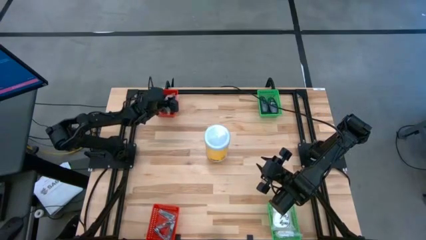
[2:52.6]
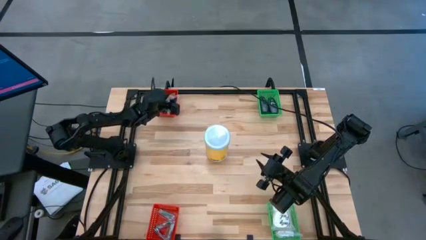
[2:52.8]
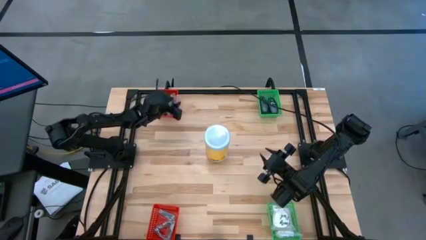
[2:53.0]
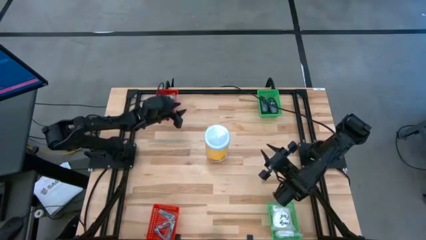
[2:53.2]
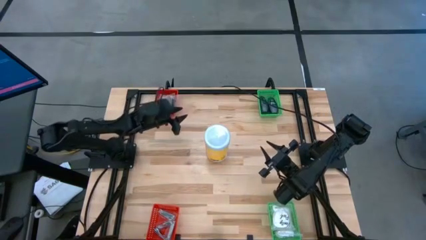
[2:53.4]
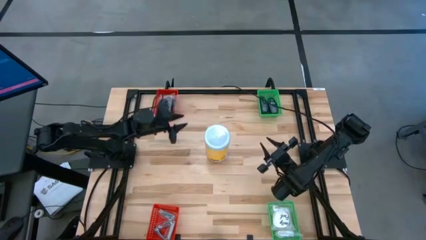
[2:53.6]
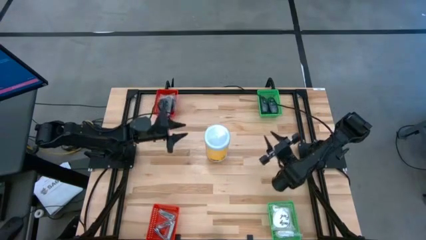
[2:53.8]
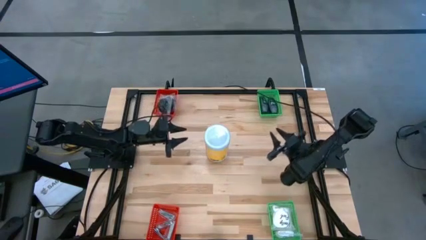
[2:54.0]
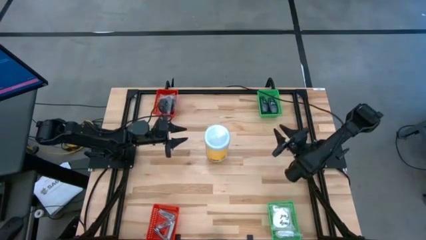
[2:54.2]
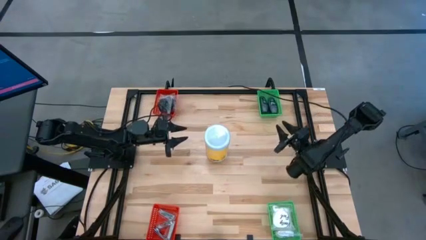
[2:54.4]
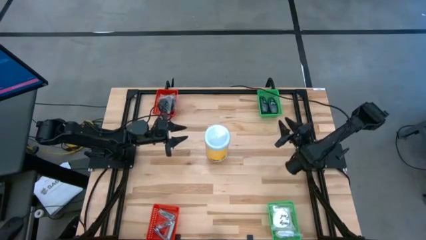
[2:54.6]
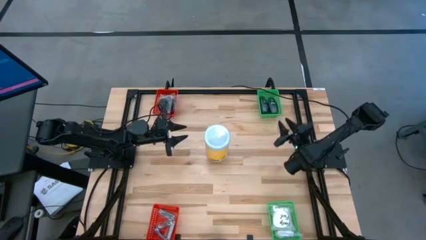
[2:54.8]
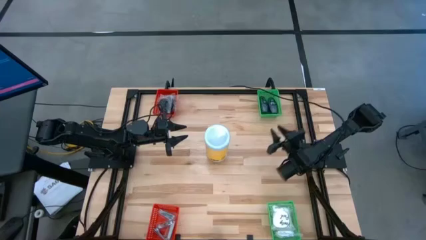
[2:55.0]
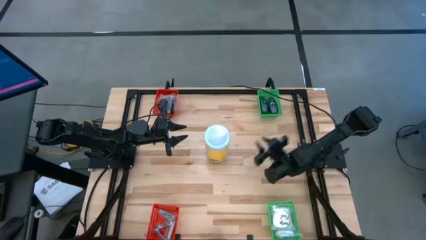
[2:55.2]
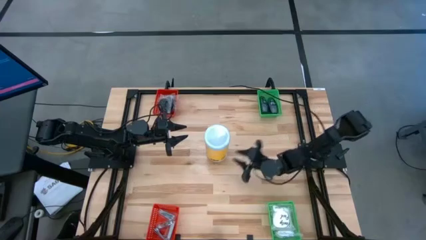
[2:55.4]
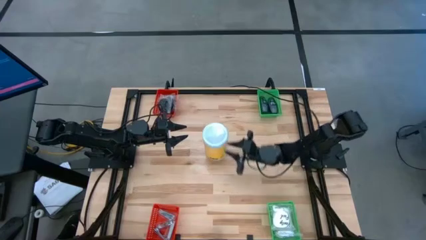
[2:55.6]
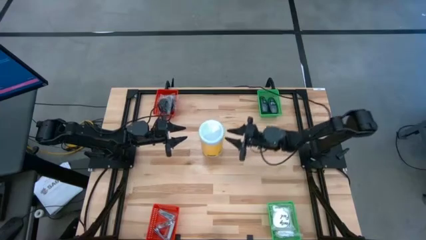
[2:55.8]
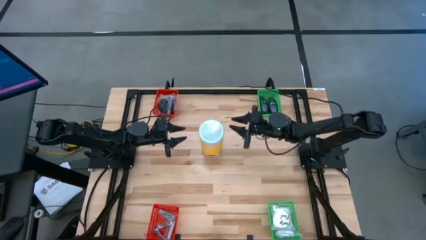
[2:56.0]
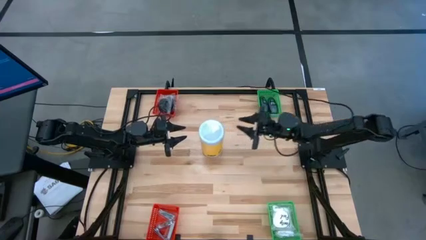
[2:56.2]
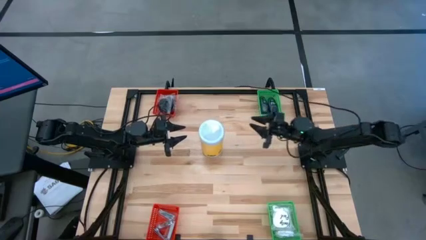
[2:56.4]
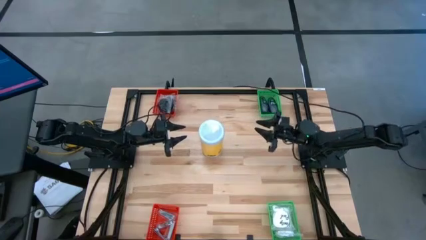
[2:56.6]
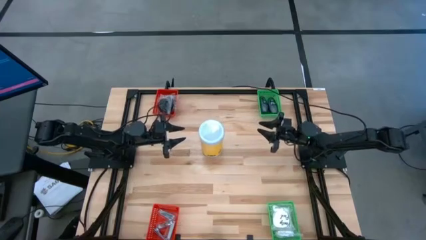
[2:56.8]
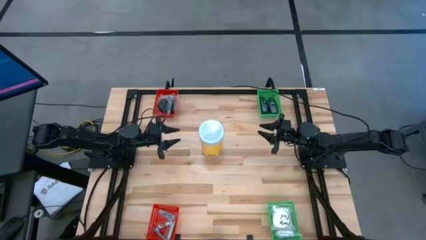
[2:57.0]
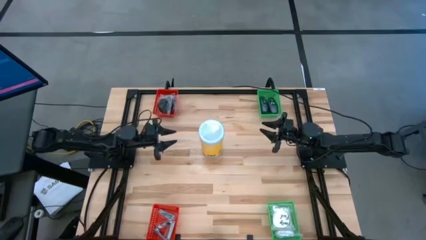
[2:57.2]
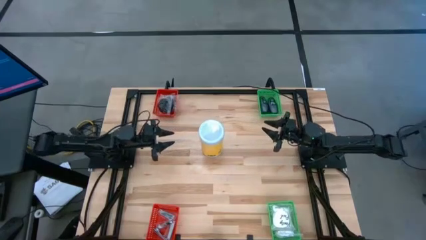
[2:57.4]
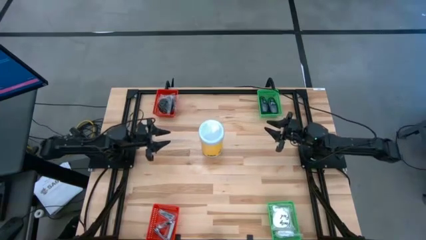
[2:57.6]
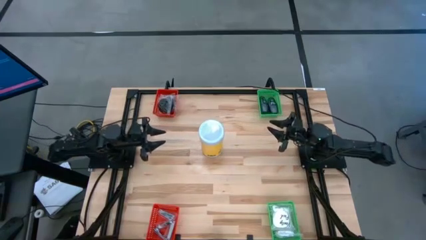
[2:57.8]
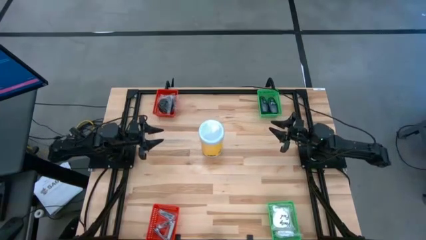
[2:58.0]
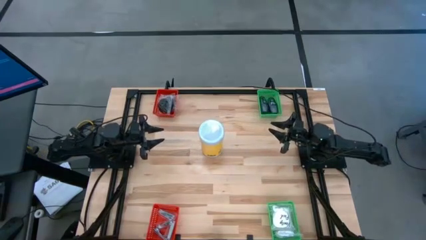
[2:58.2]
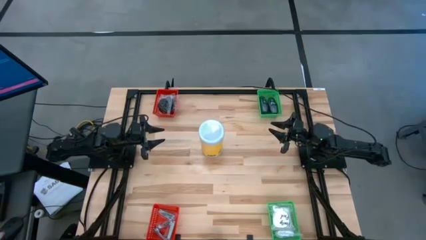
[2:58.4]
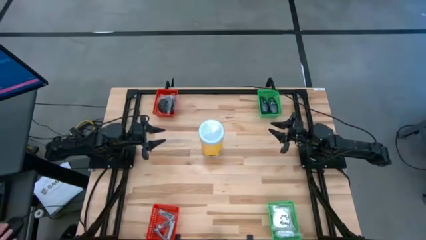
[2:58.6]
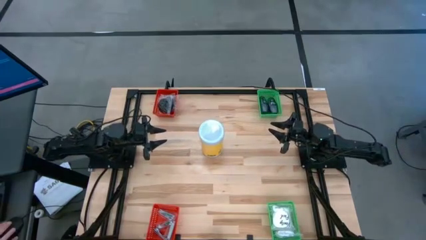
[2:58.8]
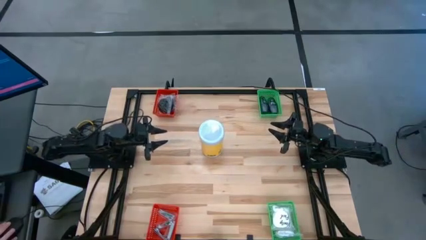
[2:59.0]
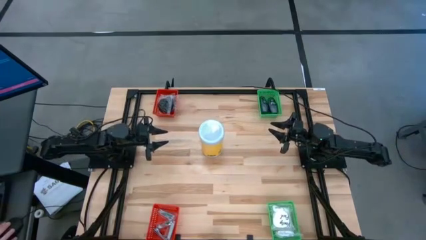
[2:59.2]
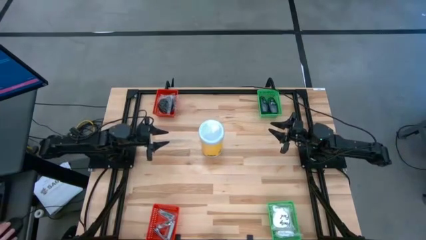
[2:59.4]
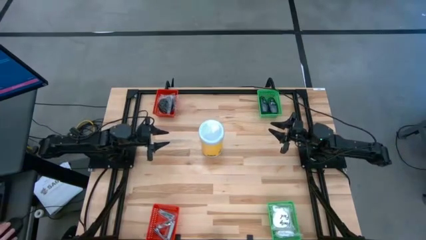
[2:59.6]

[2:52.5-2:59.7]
Task: Pick & Place Travel size toiletries
Return to Home Position

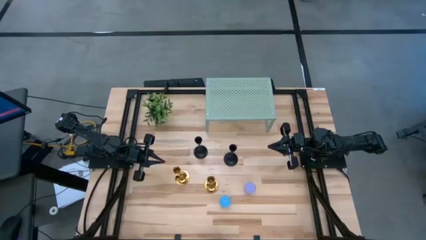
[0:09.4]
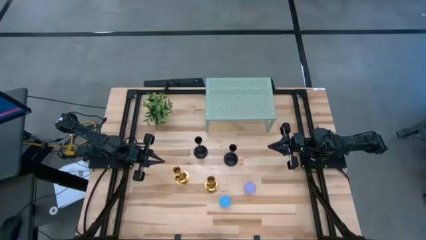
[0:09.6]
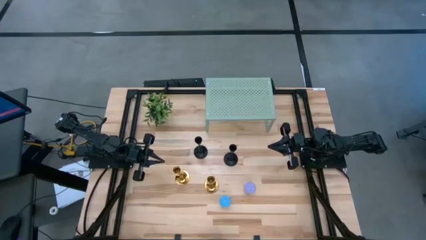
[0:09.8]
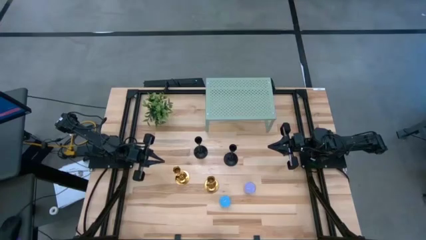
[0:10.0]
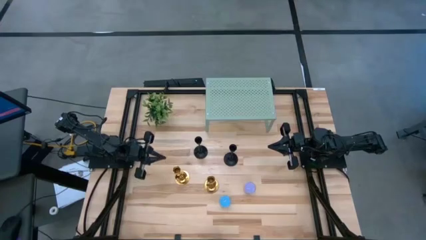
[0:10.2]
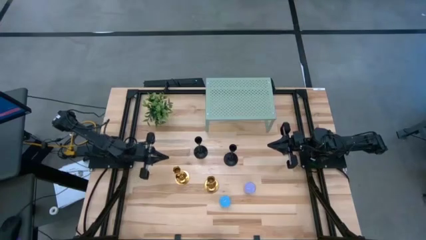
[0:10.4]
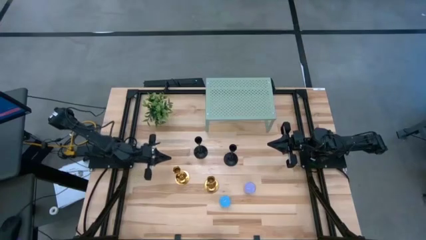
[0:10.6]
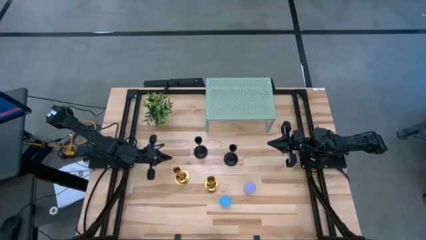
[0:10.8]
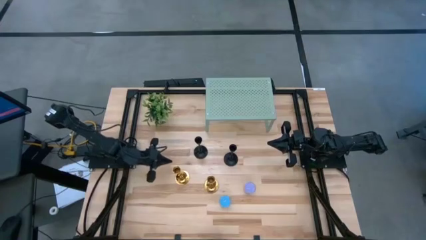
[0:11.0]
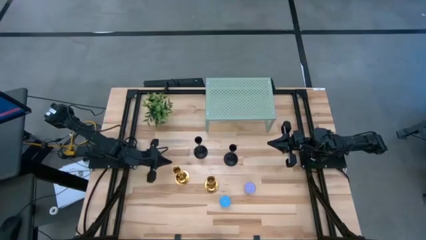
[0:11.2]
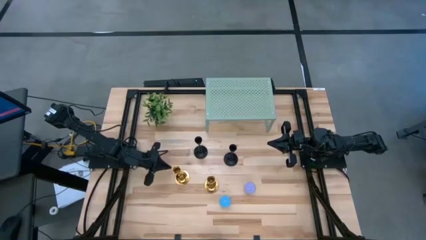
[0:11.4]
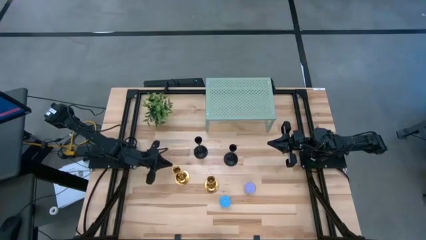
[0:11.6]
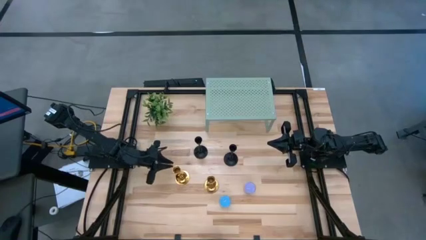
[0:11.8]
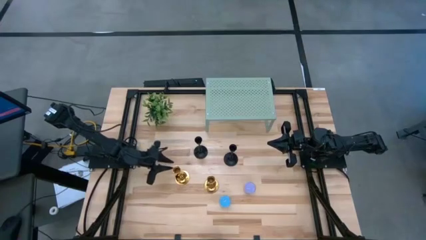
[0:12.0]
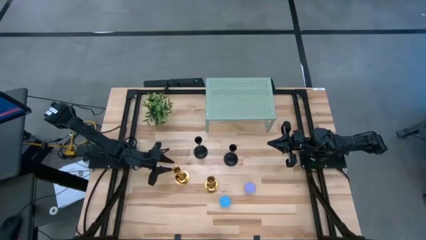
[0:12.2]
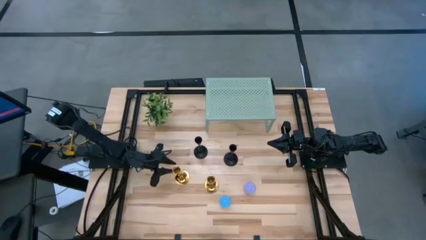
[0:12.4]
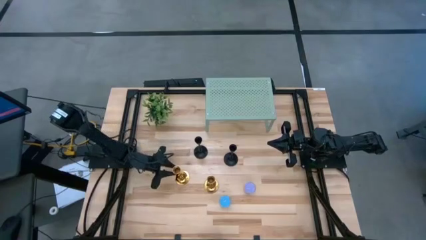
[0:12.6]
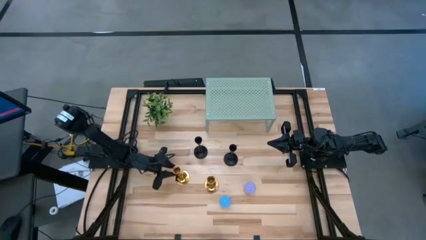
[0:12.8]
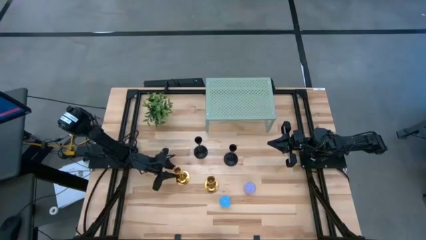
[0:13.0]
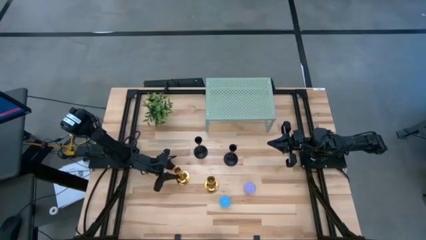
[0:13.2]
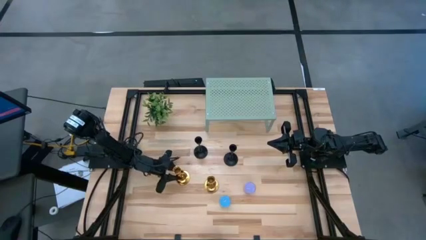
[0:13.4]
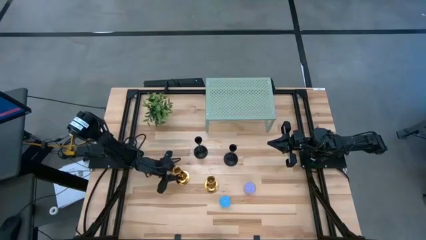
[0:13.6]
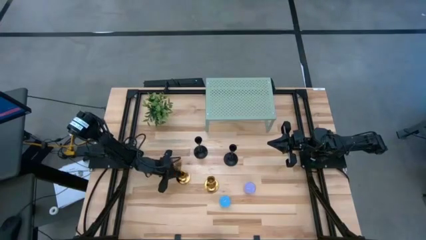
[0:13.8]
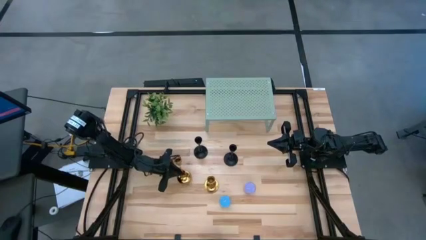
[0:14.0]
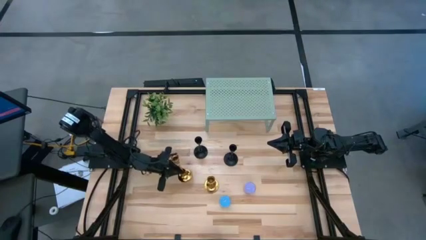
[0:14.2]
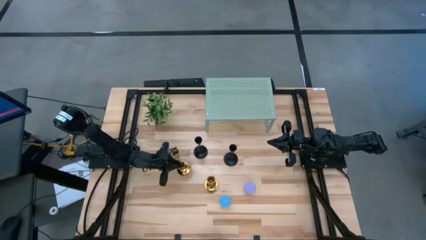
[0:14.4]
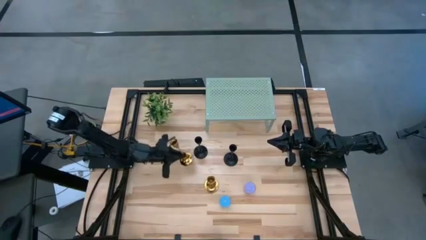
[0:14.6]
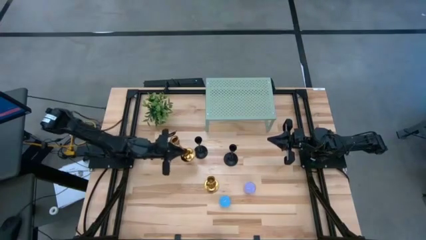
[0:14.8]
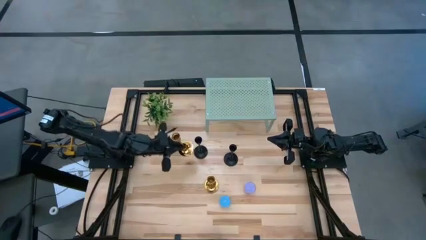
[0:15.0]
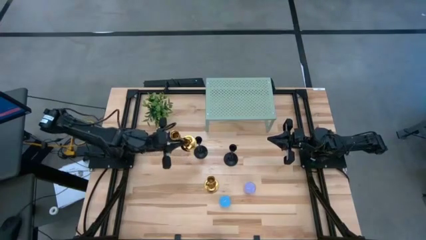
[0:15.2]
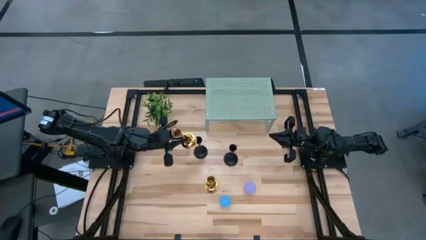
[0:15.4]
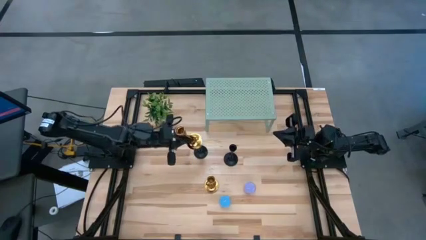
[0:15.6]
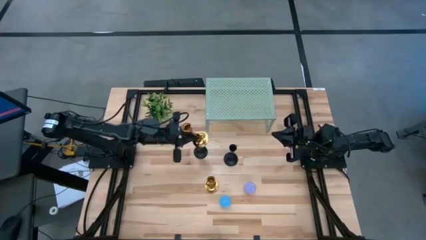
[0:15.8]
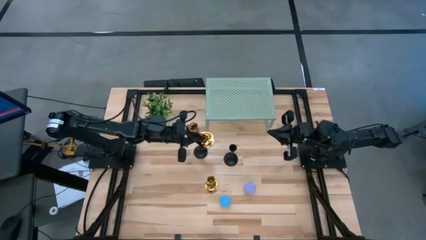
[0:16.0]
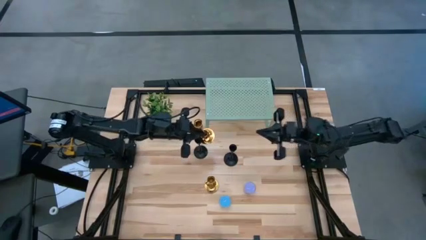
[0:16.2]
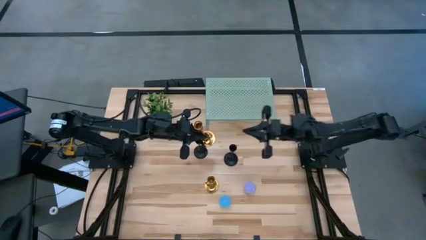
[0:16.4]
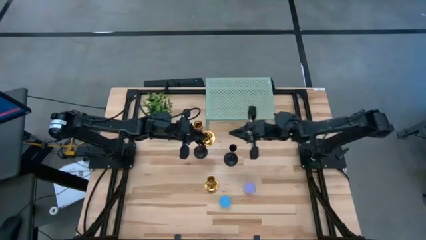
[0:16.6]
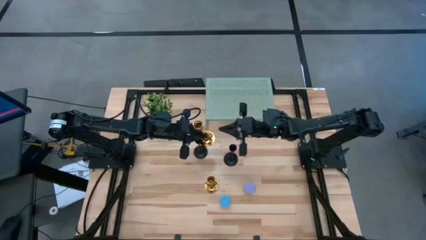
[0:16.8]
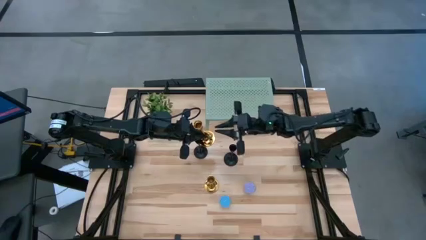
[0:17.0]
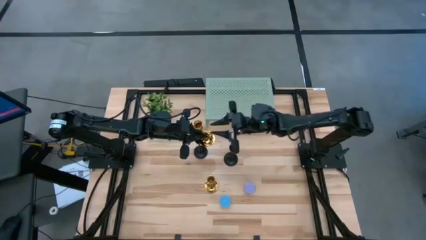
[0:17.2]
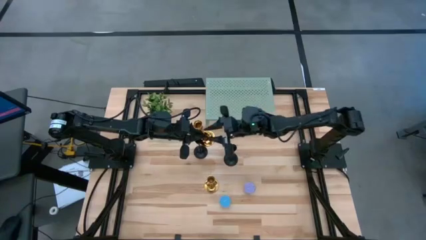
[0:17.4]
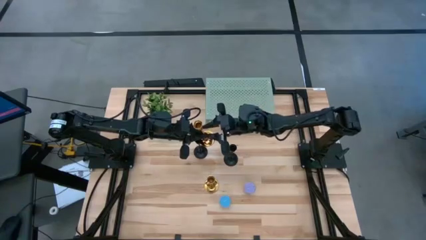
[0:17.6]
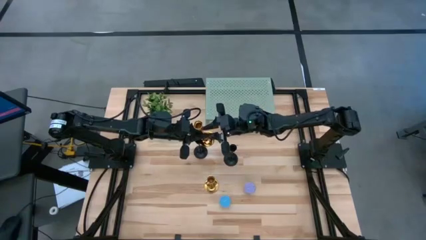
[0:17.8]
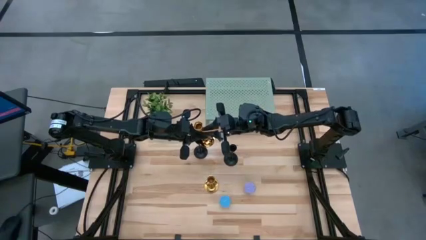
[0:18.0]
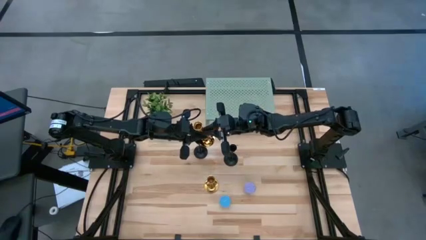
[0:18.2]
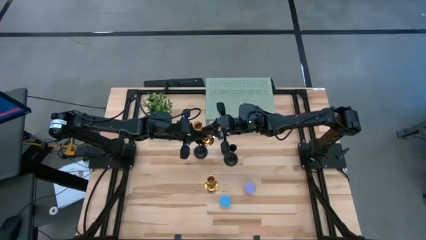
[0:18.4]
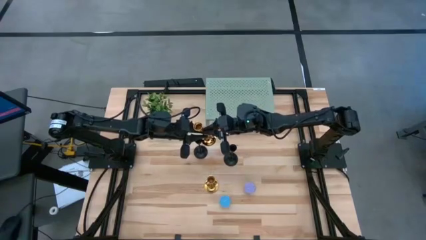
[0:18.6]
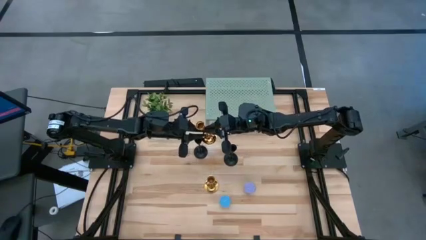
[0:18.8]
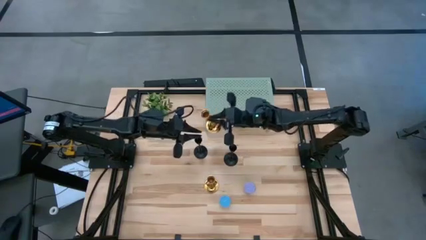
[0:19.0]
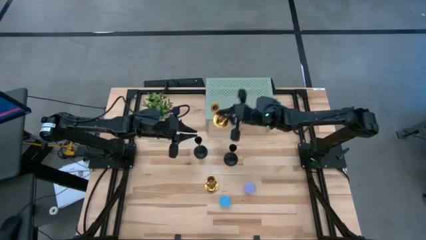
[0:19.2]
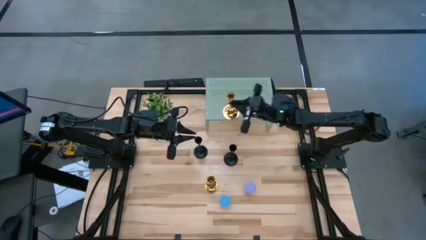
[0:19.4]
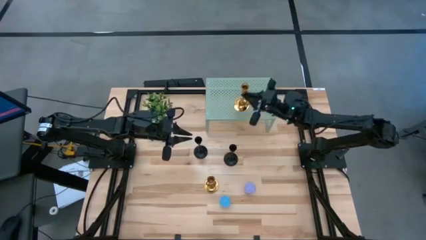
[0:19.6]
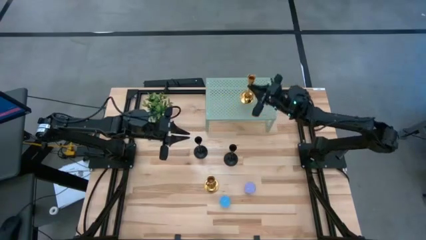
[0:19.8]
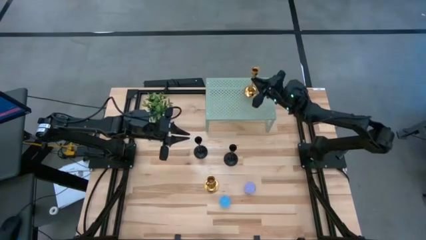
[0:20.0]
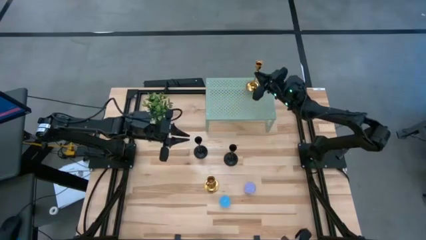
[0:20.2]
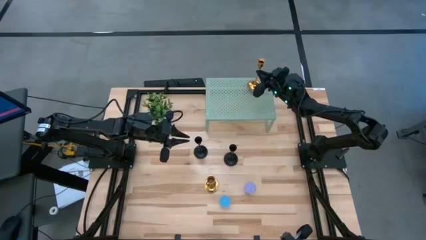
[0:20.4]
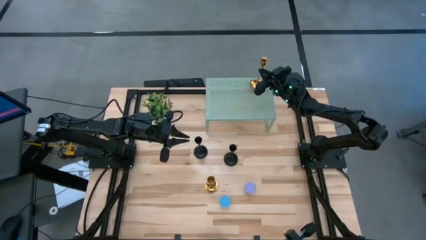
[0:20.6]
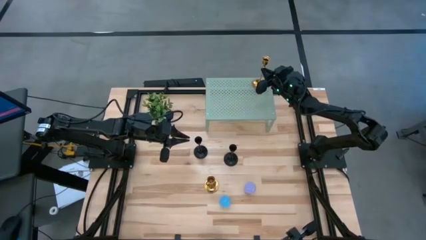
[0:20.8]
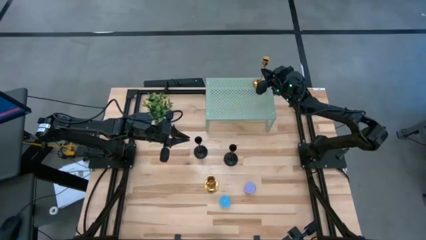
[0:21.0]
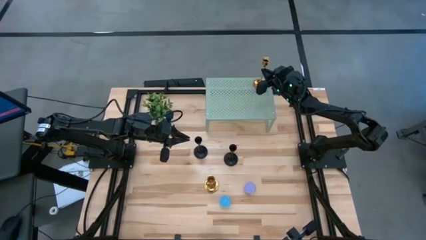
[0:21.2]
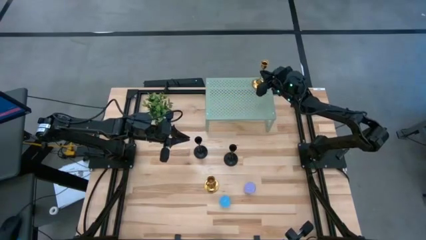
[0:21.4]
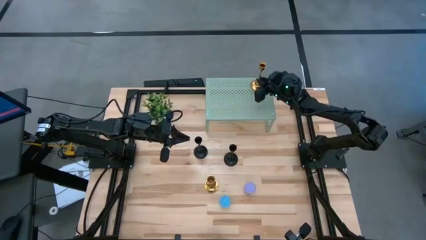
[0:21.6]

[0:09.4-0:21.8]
Task: Pick & Place candle stick holders
Put the gold candle holder on the shelf
